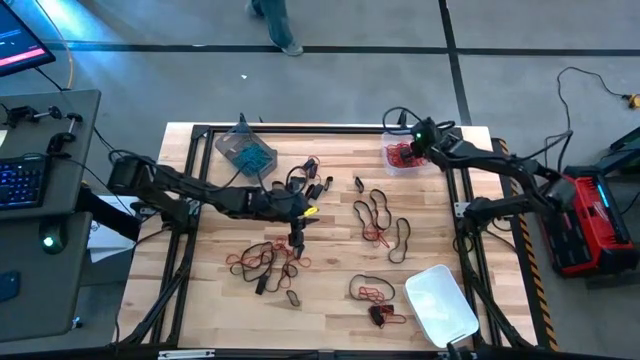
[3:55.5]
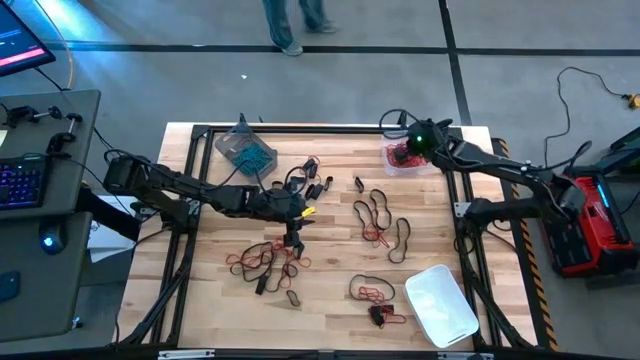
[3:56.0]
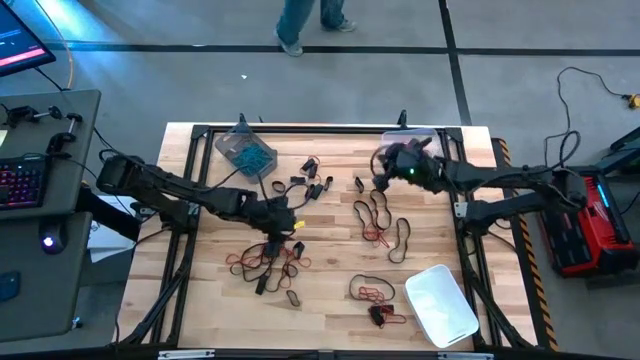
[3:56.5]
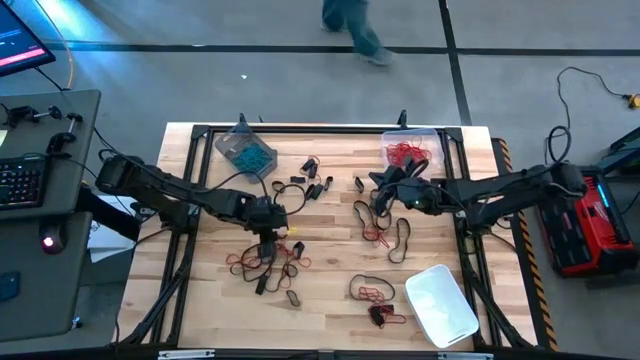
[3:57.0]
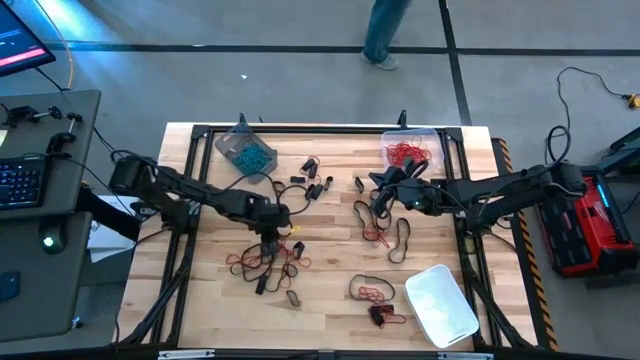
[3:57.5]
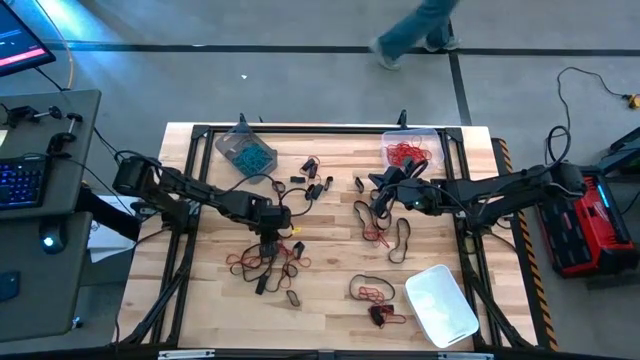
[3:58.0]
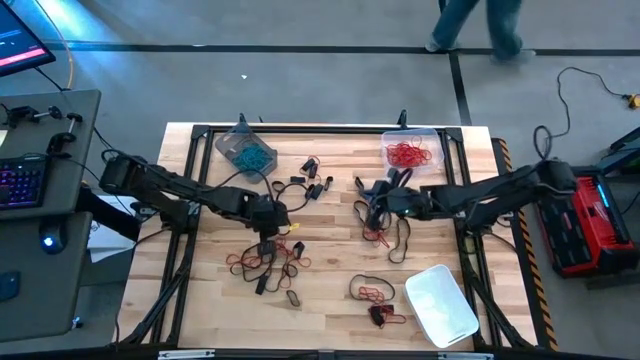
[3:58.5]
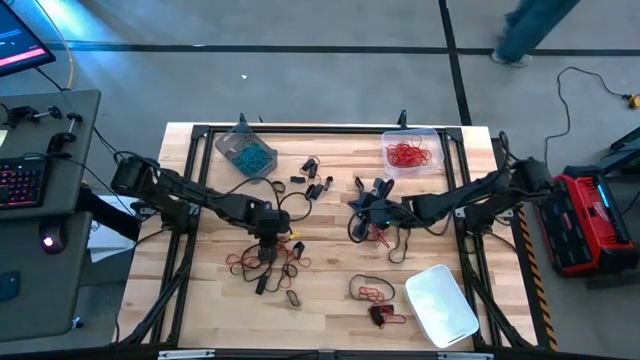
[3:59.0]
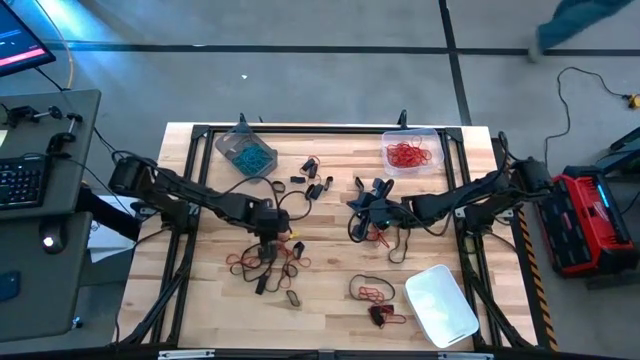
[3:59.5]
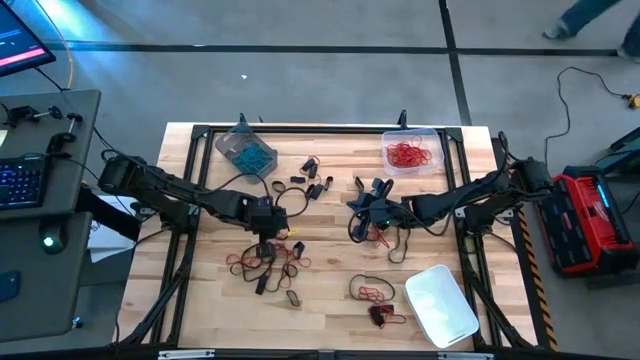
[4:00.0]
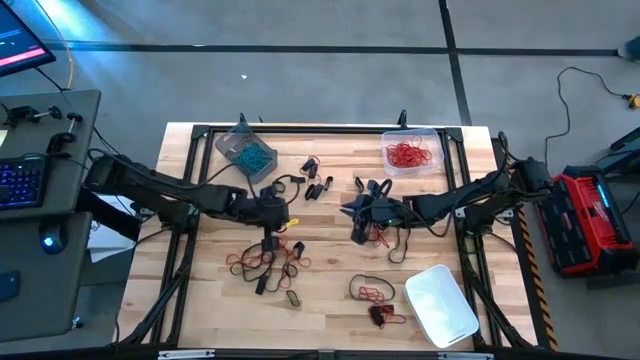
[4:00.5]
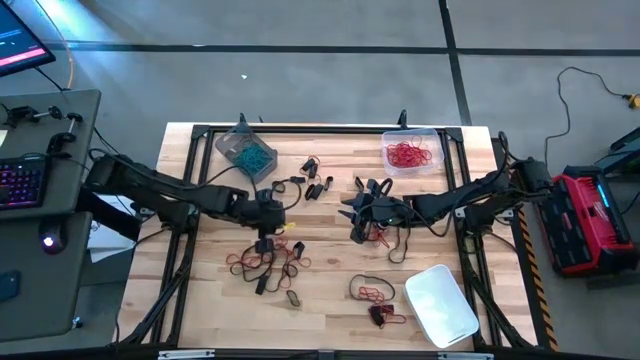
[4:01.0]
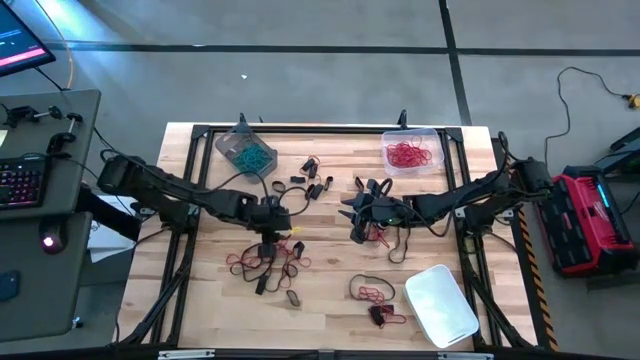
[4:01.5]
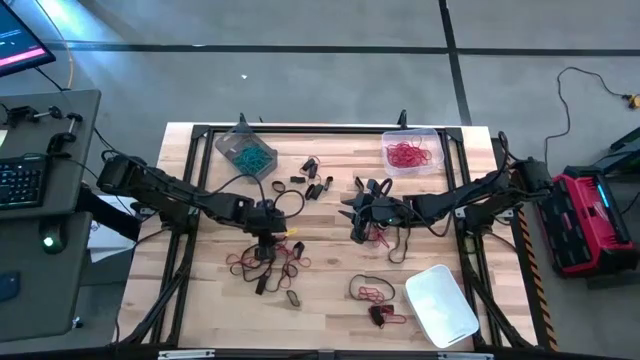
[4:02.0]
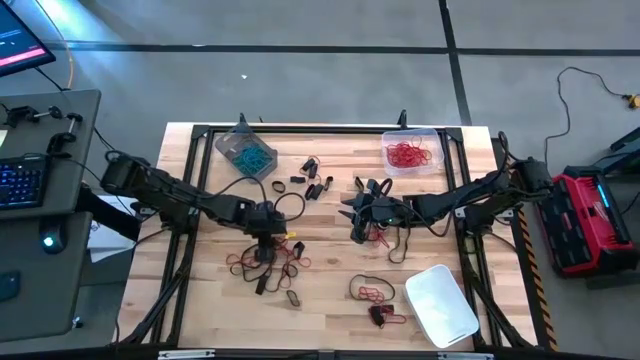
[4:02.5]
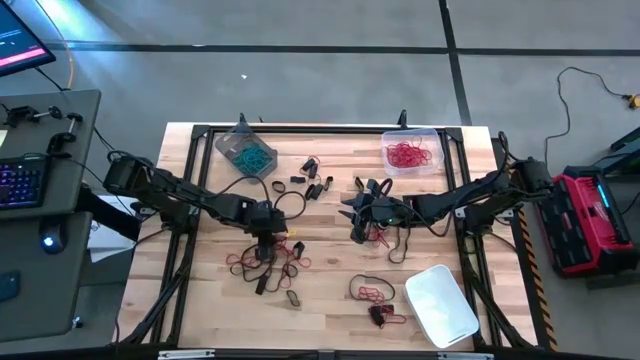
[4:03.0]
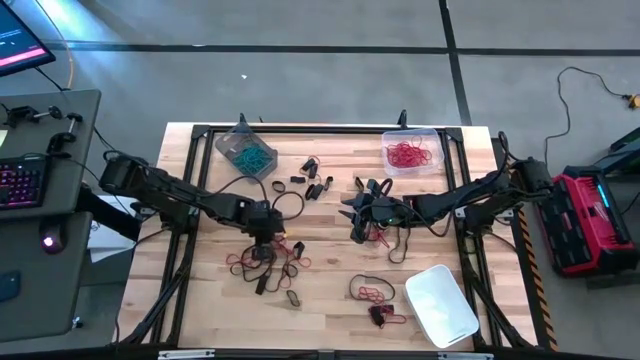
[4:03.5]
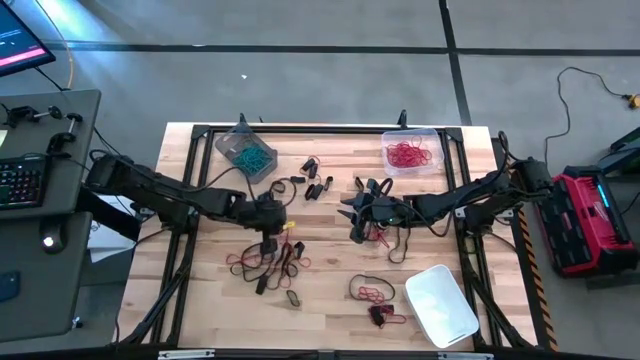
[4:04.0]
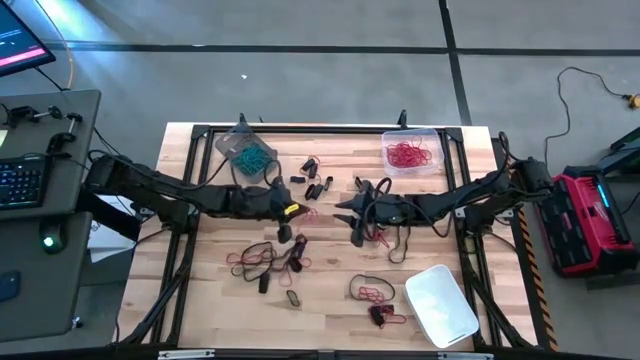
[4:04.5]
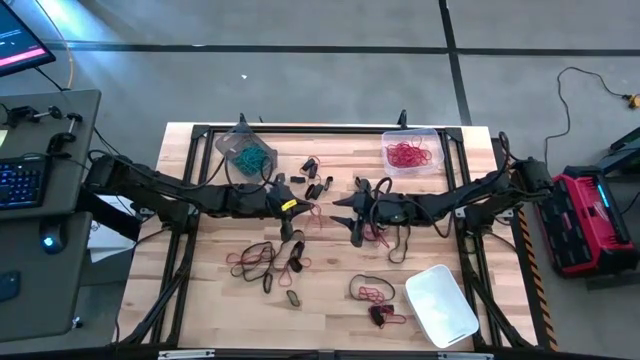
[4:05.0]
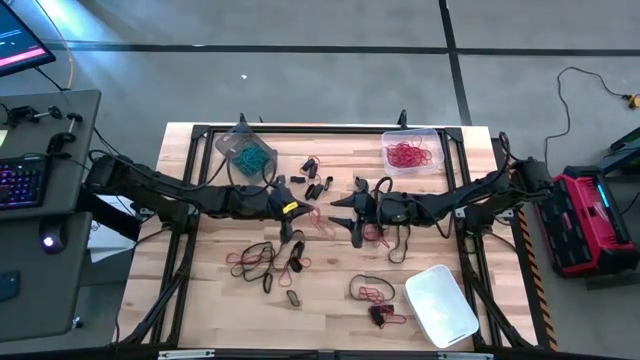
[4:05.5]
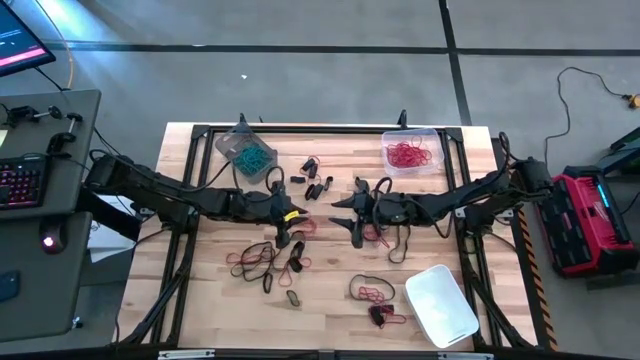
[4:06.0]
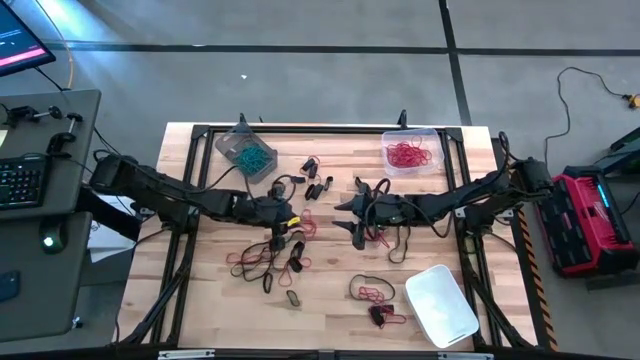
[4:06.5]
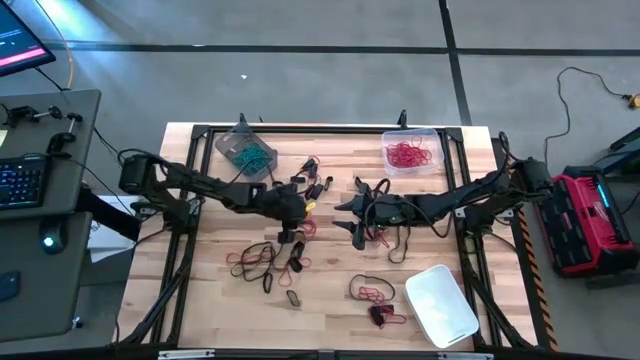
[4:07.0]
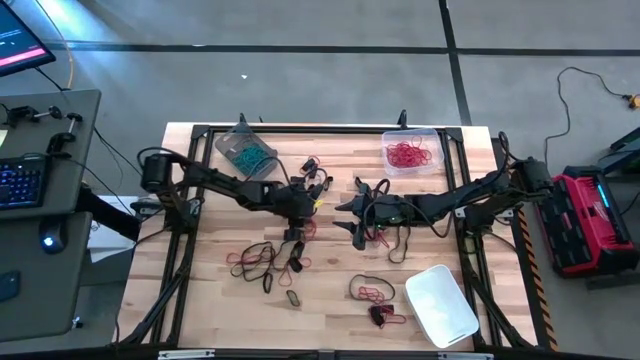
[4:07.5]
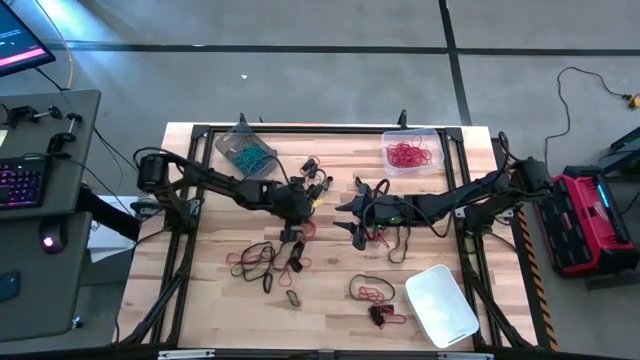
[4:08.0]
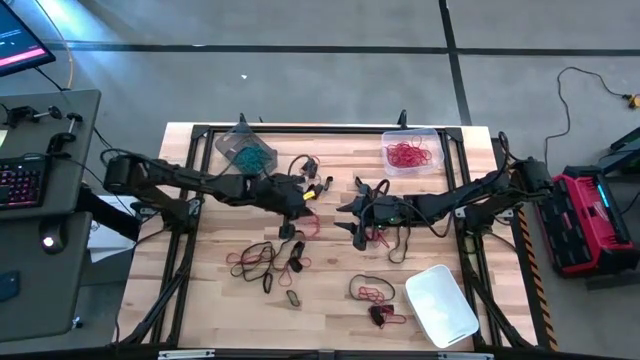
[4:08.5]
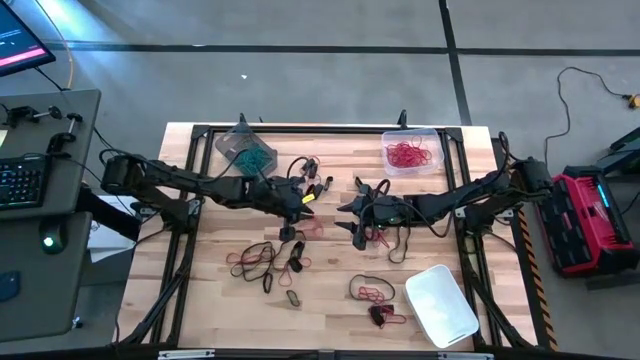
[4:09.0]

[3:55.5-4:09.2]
Task: Sort rubber bands into baskets
Put the red rubber band into the transparent bin

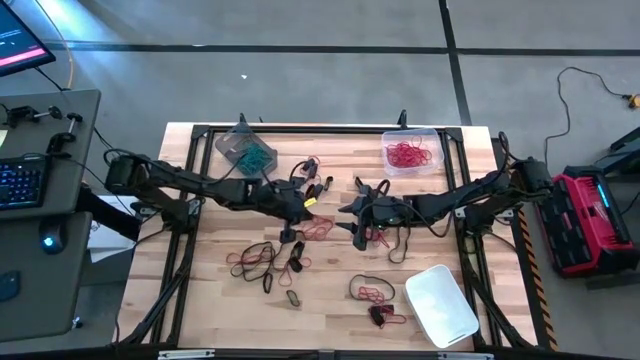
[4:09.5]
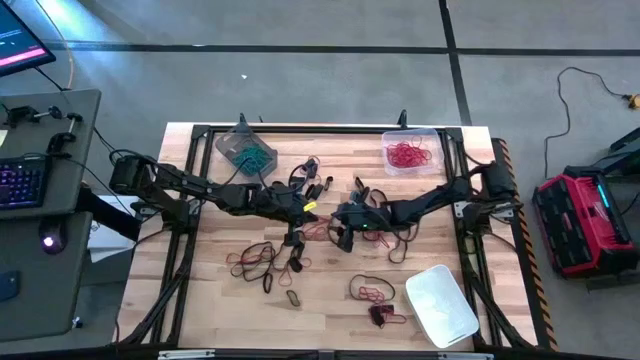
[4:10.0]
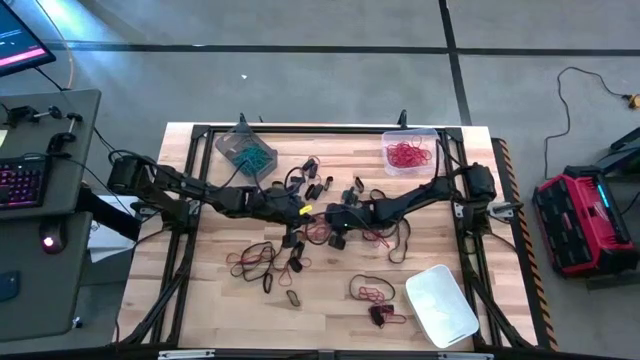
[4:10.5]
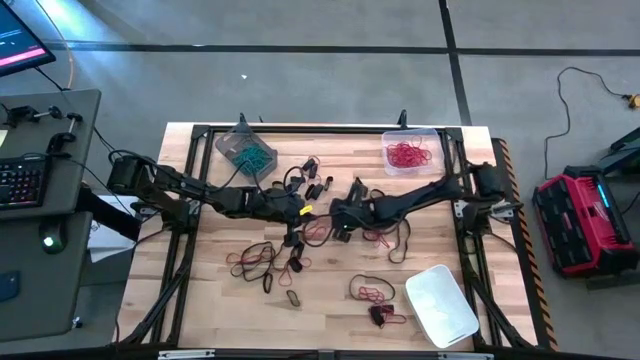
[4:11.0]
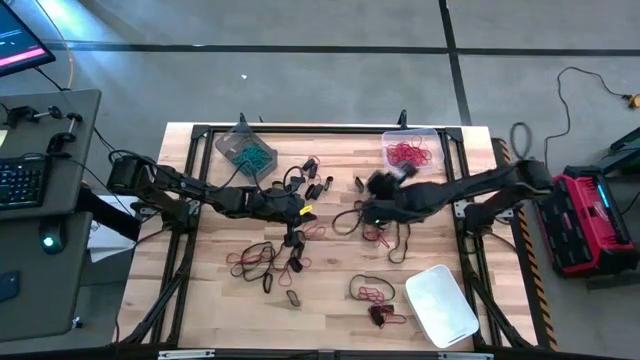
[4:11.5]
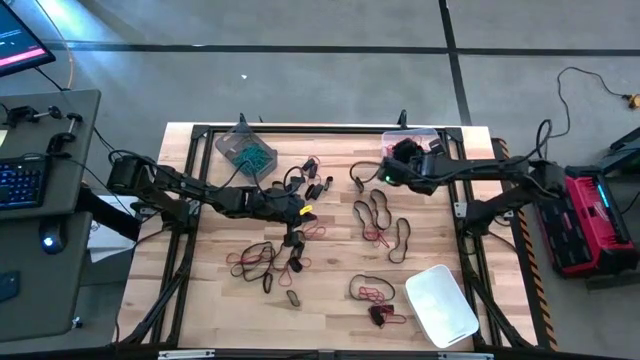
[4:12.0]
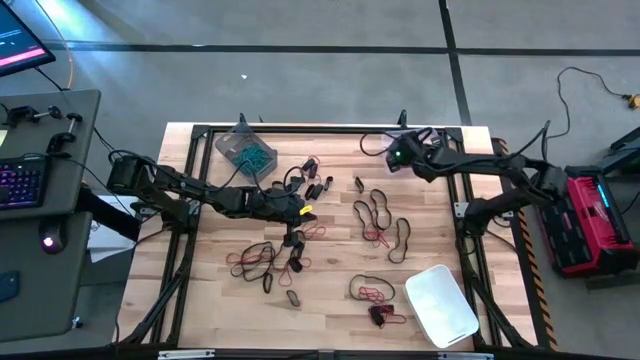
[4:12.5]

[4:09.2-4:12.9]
Put the red rubber band into the transparent bin

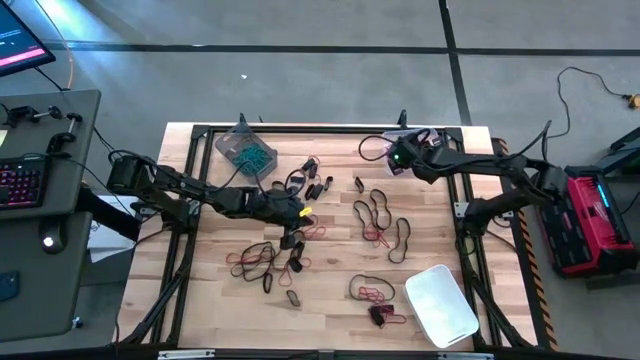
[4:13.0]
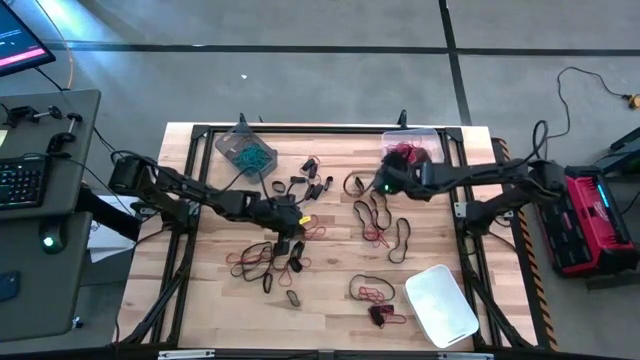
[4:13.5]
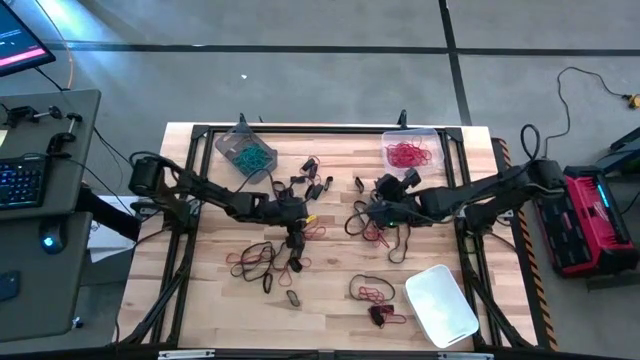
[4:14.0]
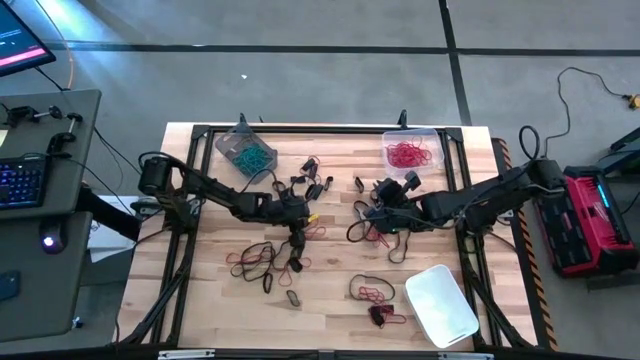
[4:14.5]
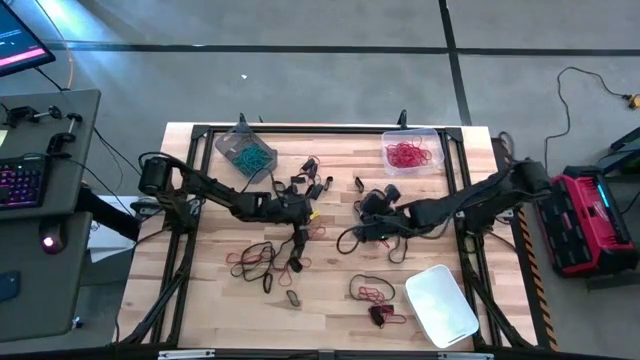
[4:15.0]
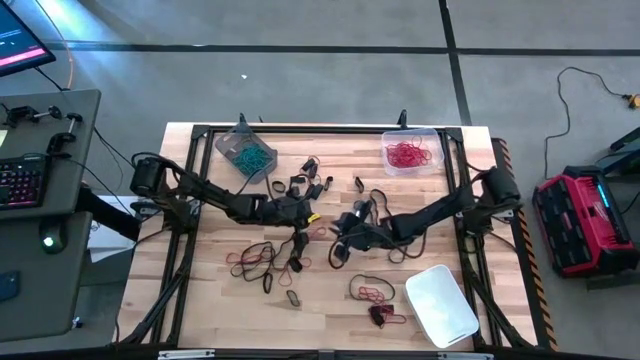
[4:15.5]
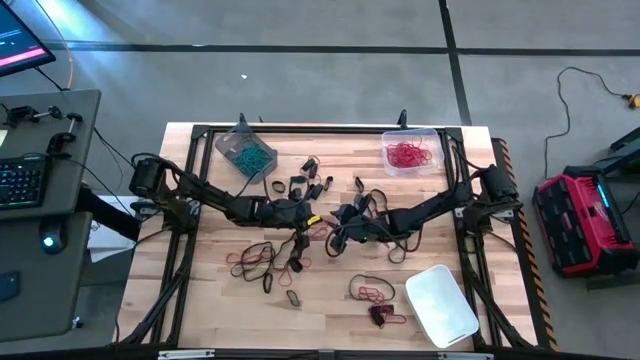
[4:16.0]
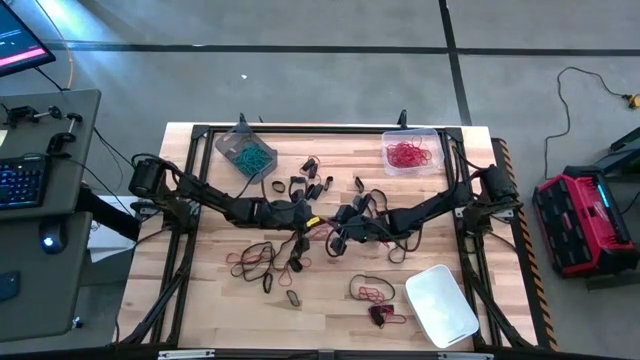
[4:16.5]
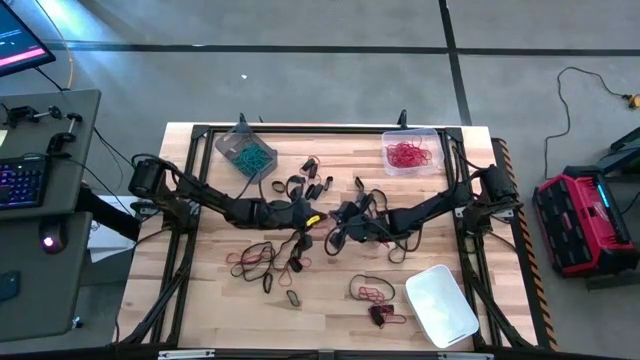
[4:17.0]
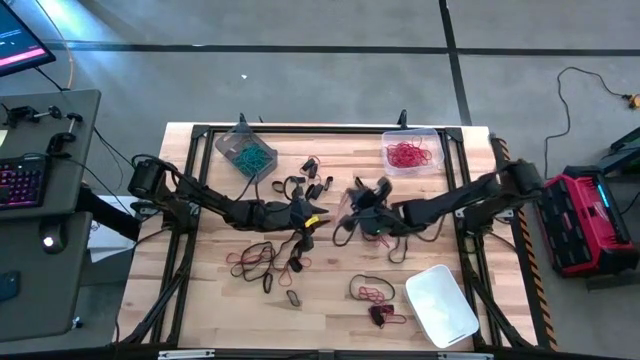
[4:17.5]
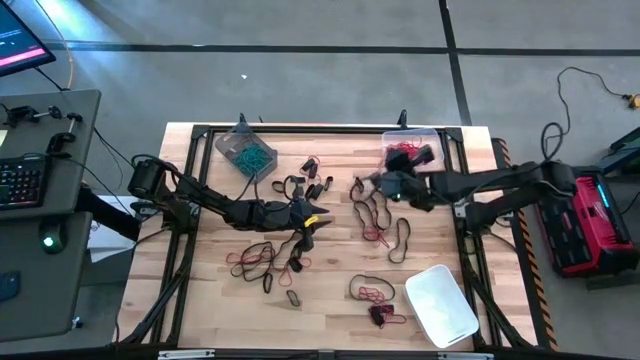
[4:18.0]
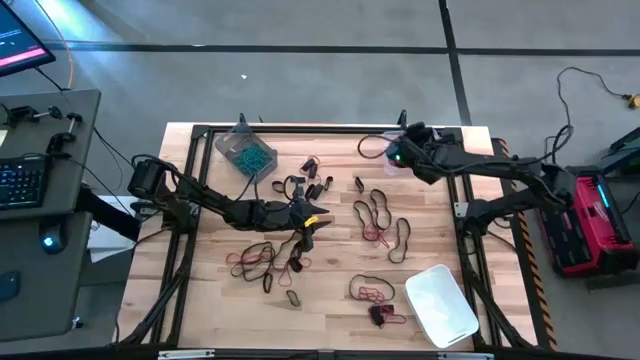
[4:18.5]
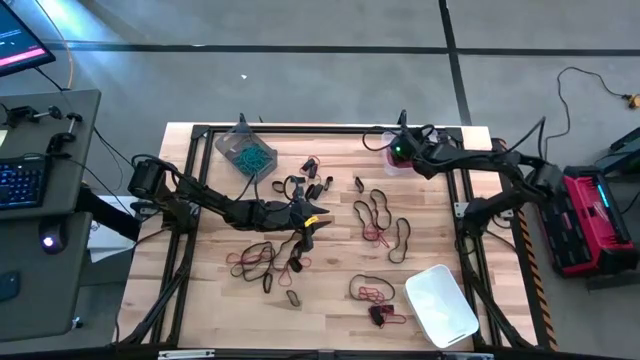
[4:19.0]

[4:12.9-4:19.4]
Put the red rubber band into the transparent bin
